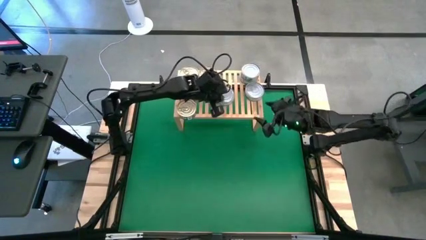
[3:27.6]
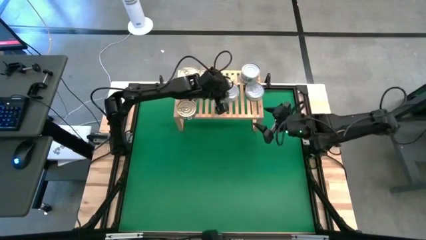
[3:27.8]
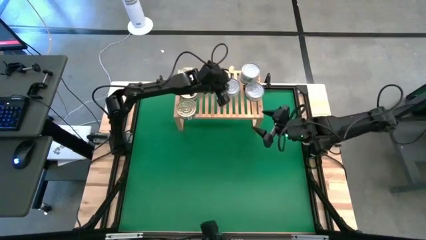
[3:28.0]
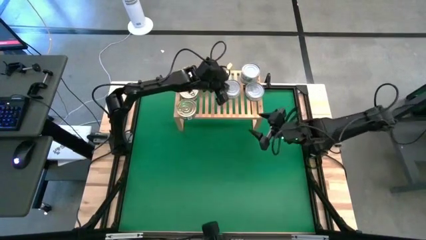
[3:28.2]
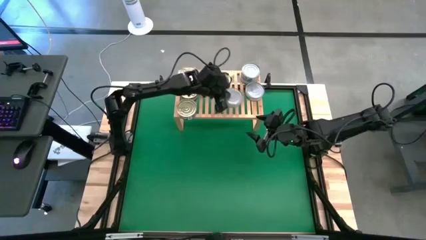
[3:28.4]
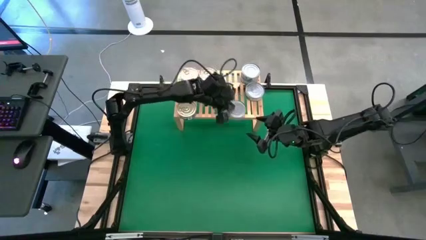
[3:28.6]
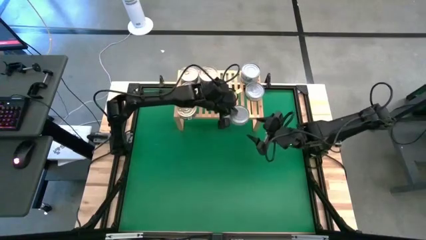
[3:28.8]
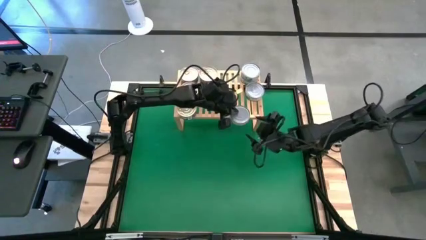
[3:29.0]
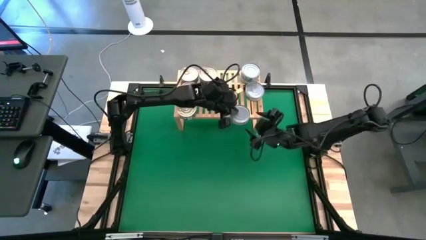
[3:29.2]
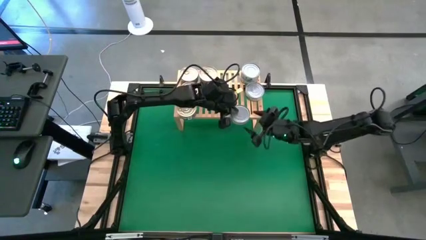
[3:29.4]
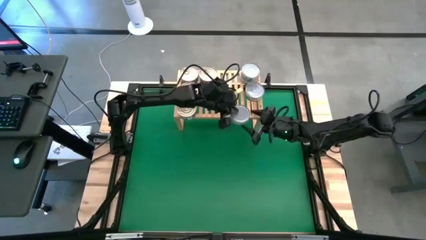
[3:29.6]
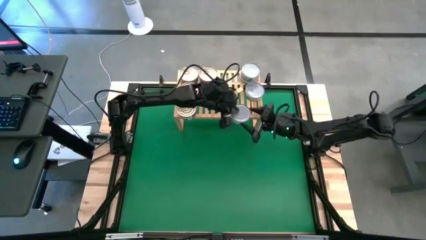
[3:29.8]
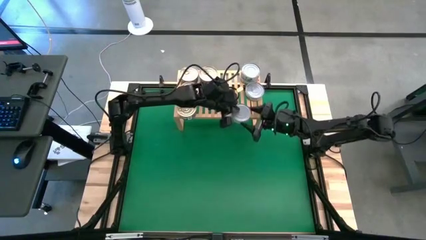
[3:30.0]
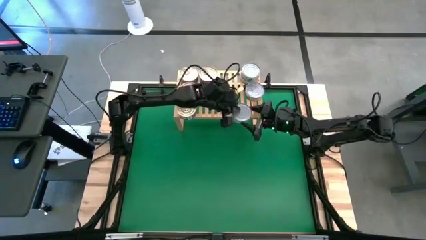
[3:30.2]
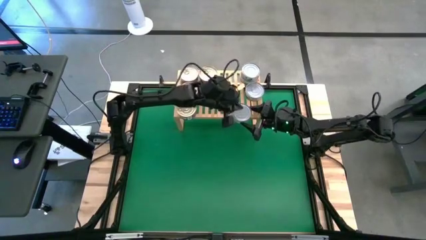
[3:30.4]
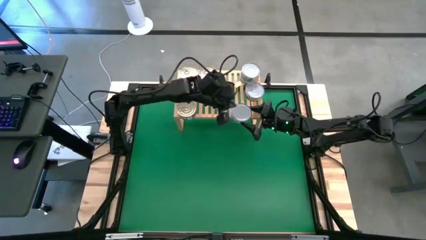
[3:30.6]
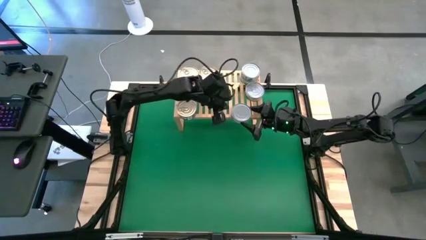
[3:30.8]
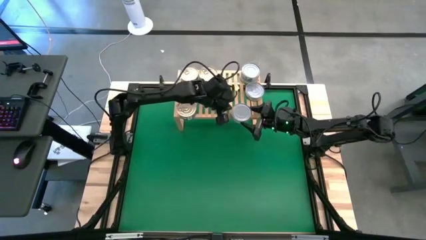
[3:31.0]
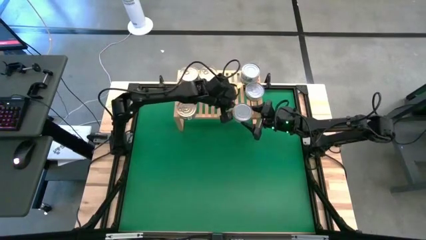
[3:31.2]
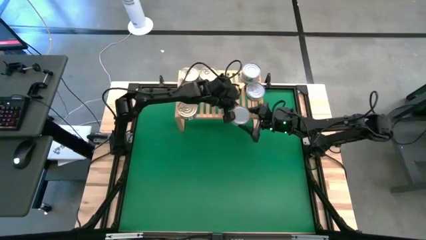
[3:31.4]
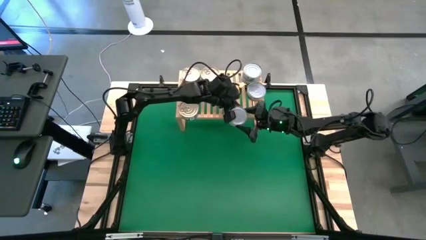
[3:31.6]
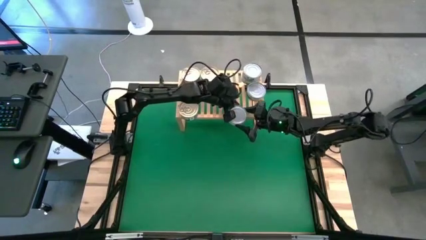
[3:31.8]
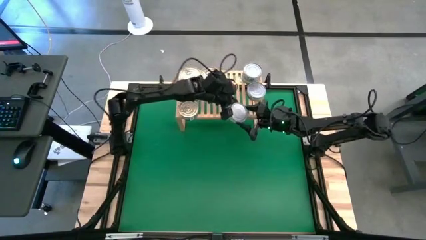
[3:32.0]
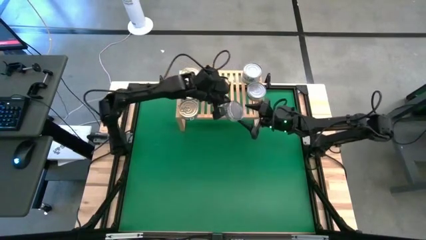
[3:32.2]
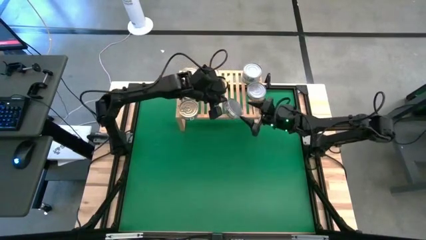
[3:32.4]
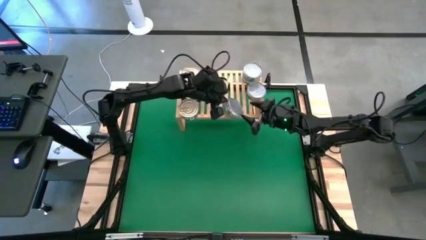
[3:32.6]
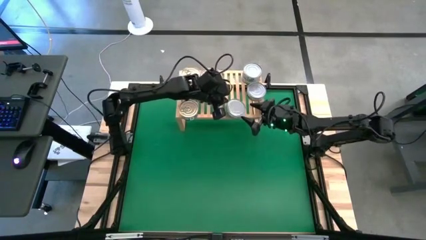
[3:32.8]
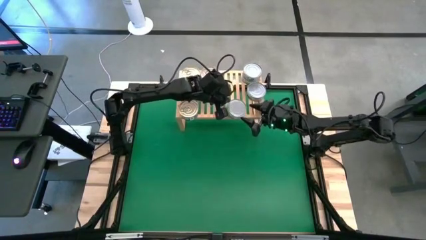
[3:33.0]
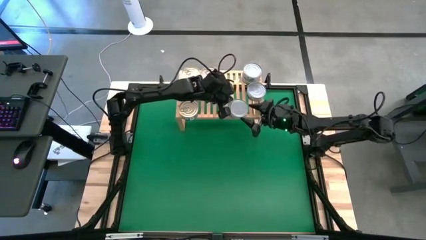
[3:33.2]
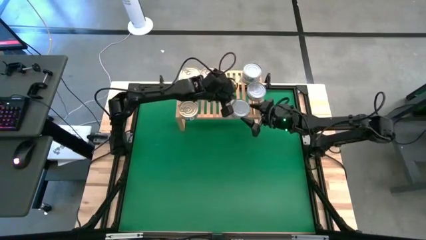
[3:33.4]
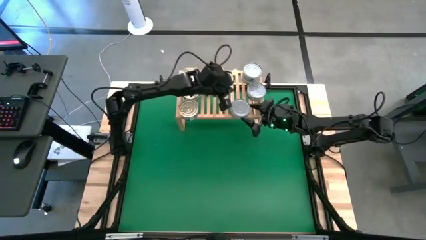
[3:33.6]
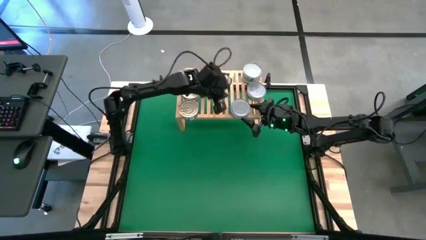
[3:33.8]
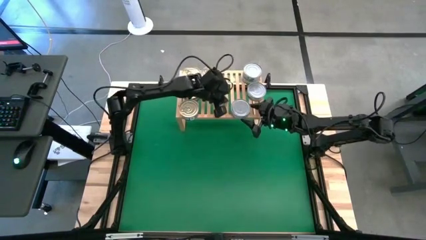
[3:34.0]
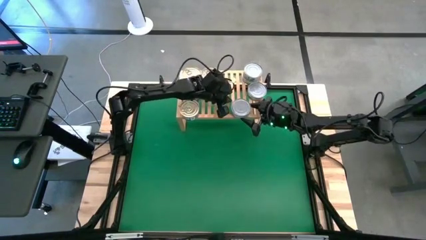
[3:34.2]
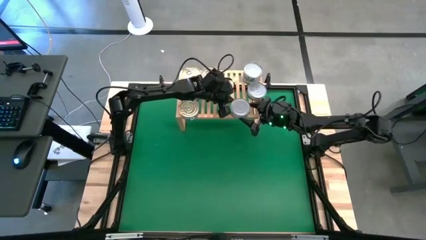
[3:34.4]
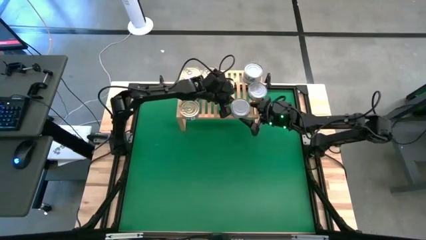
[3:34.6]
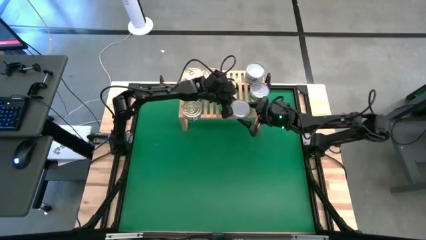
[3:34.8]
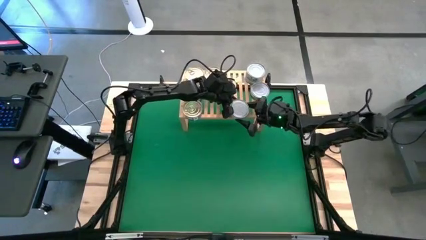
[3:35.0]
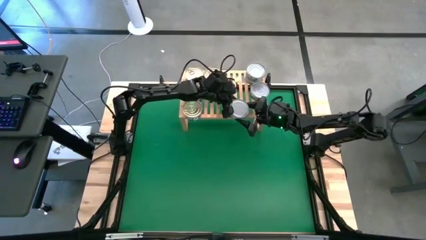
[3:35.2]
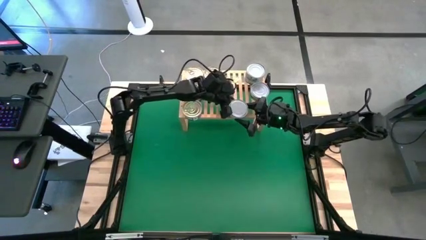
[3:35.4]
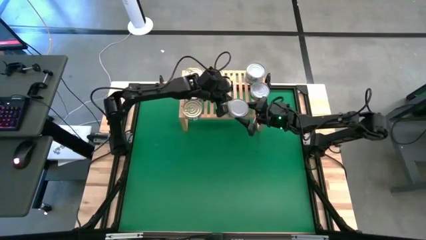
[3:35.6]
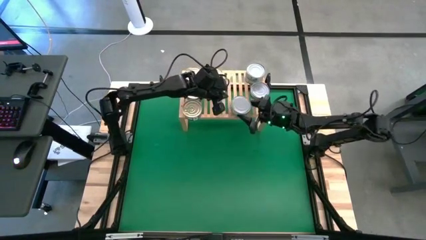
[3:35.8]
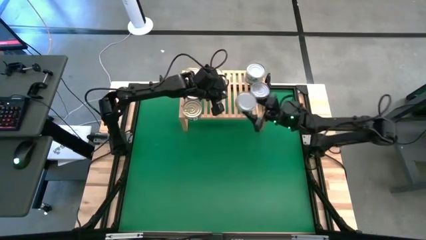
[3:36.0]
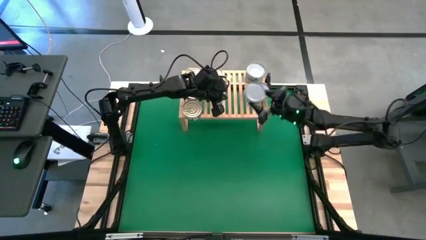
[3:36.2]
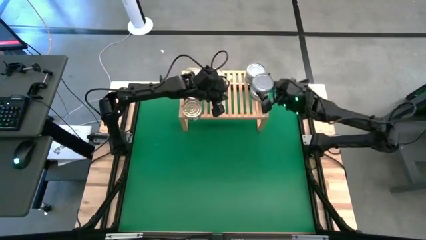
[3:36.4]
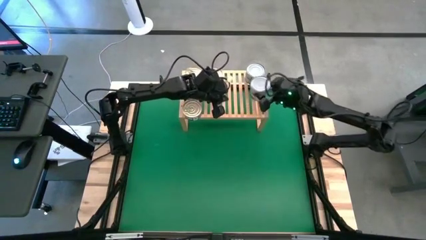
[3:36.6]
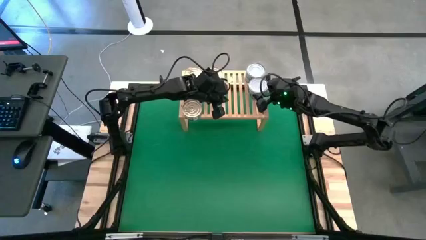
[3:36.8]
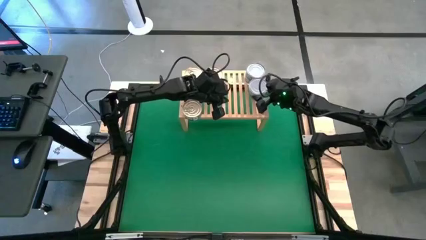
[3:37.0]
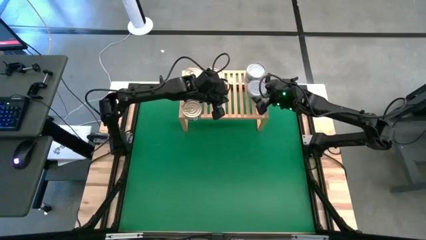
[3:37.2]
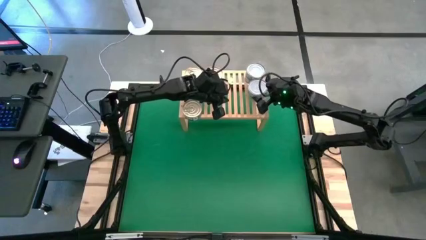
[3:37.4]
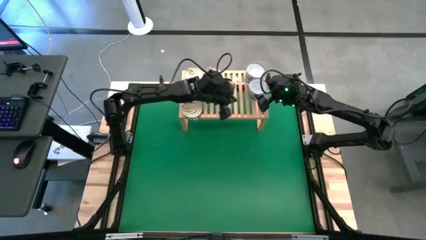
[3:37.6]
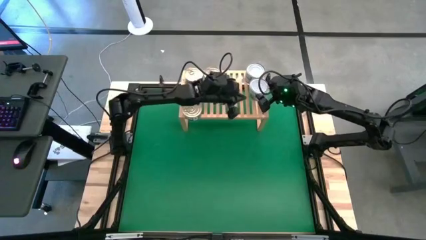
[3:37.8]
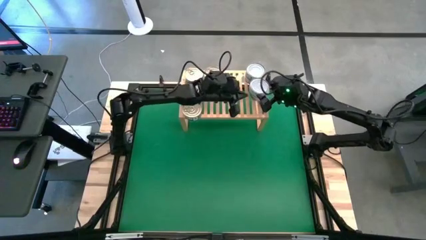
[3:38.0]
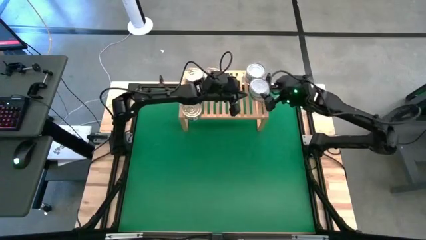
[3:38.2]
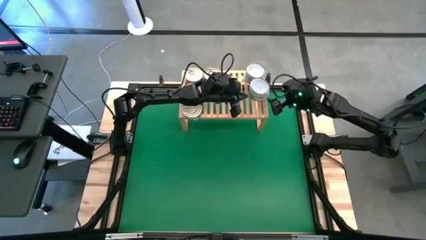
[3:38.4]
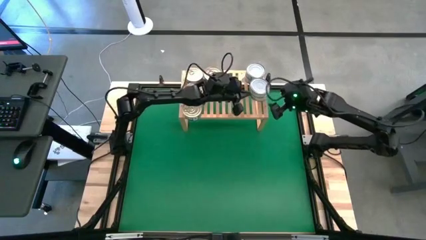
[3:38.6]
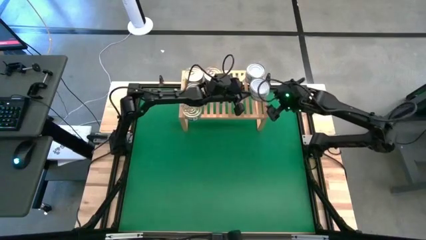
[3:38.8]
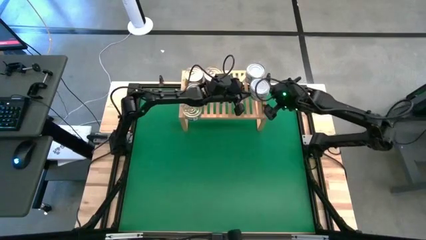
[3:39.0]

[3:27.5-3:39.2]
Task: Stack canned seafood by type on shelf
Stack the green tuna can on top of the green tuna can on the shelf

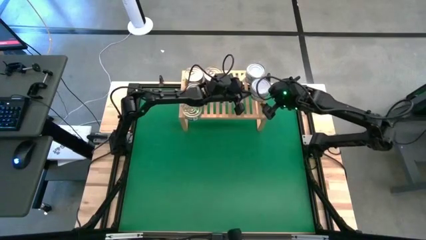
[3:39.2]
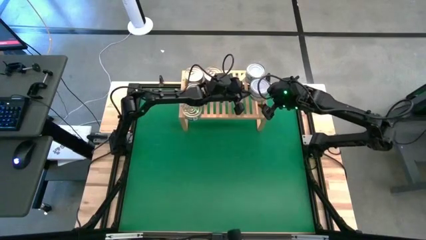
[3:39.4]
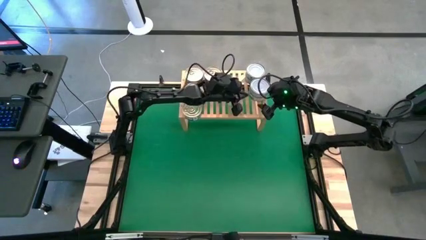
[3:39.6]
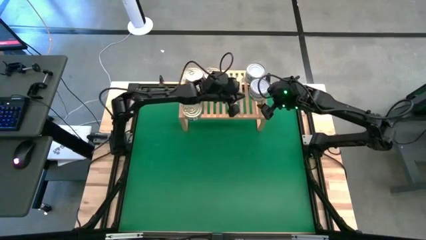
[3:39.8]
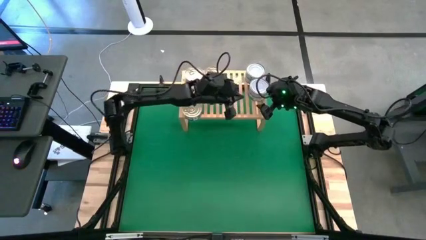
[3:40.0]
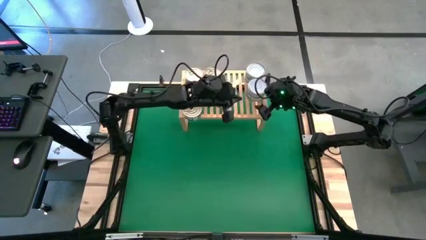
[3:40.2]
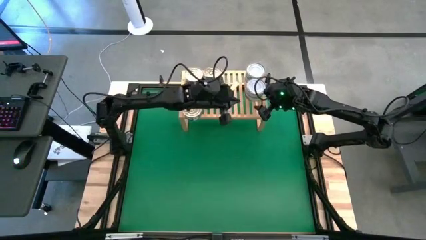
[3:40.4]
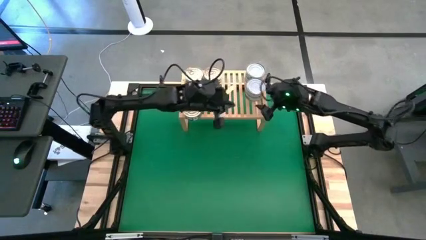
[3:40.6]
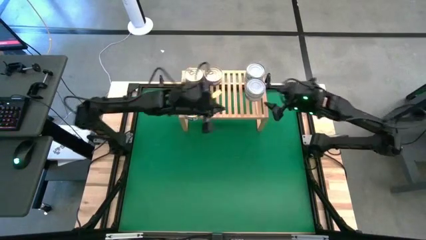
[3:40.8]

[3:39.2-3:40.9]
Adjust the green tuna can

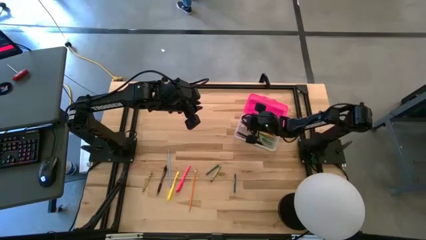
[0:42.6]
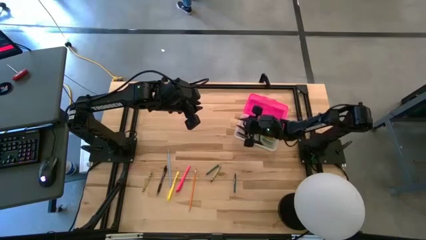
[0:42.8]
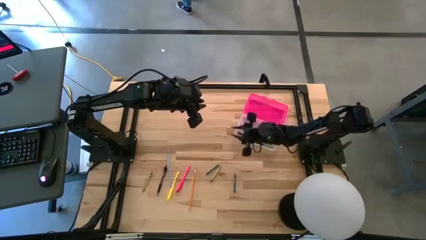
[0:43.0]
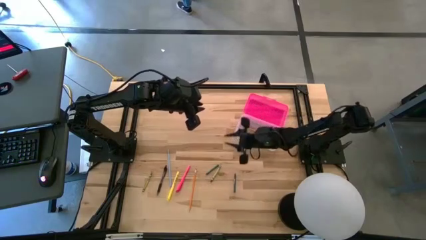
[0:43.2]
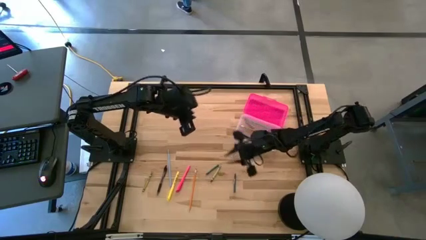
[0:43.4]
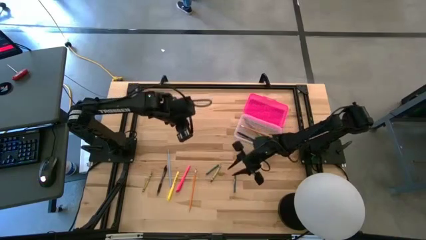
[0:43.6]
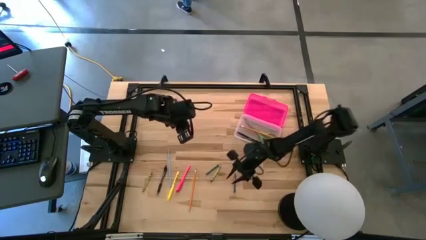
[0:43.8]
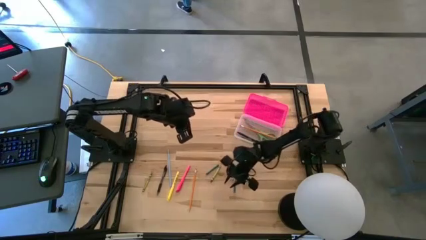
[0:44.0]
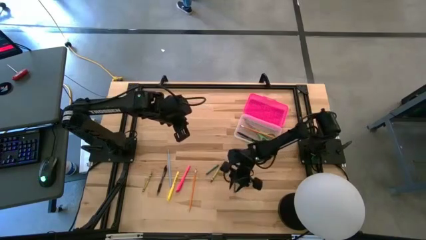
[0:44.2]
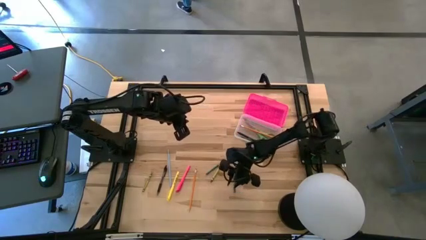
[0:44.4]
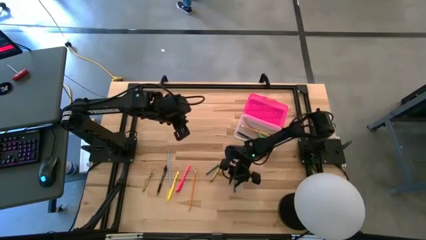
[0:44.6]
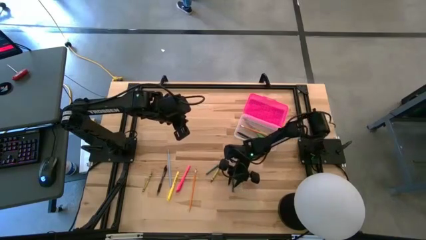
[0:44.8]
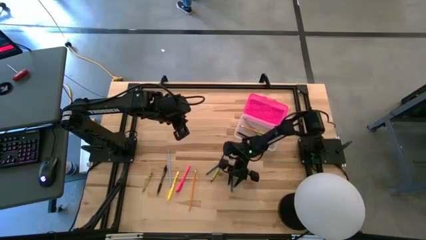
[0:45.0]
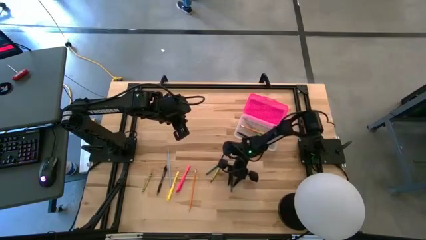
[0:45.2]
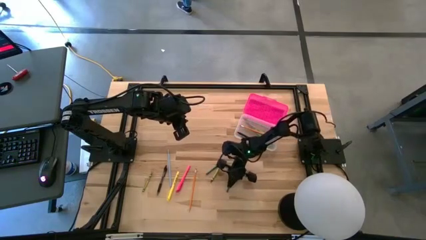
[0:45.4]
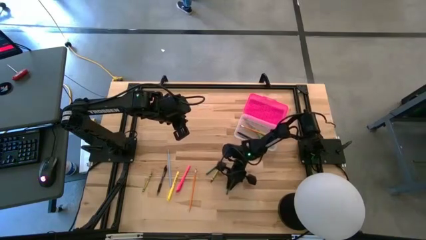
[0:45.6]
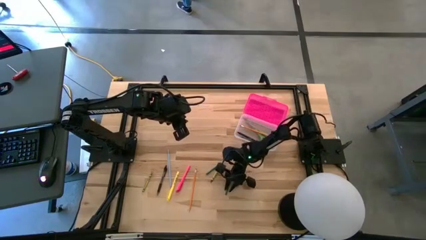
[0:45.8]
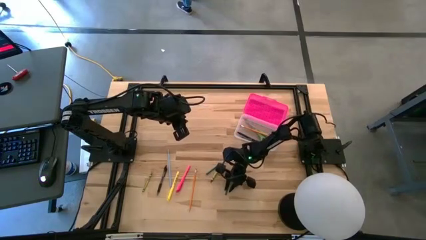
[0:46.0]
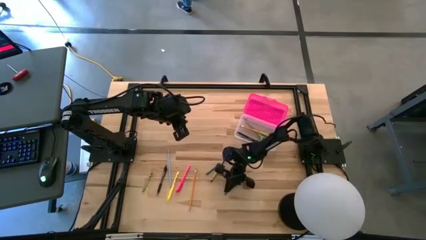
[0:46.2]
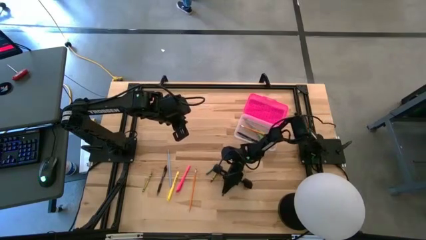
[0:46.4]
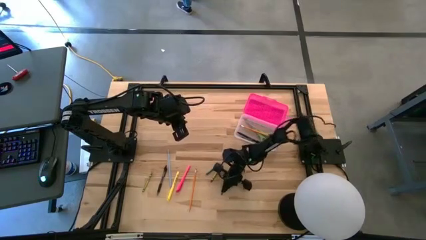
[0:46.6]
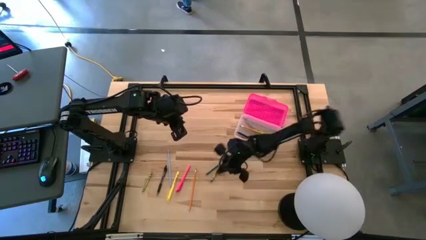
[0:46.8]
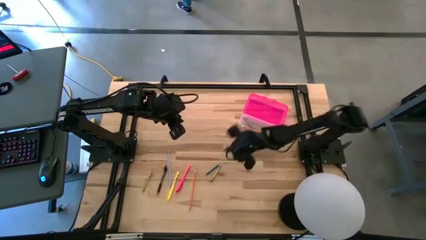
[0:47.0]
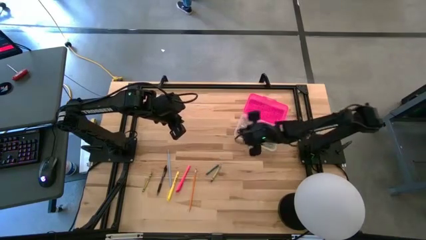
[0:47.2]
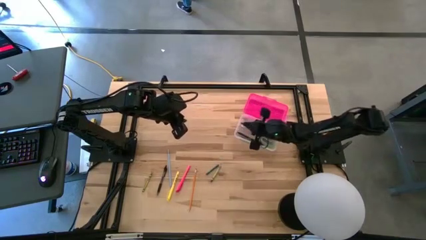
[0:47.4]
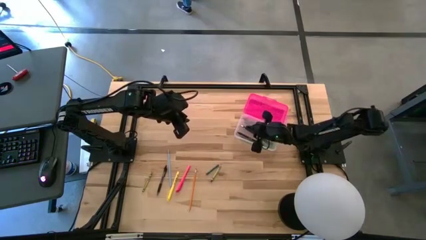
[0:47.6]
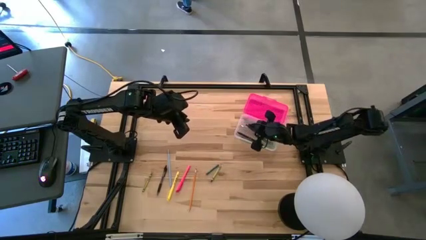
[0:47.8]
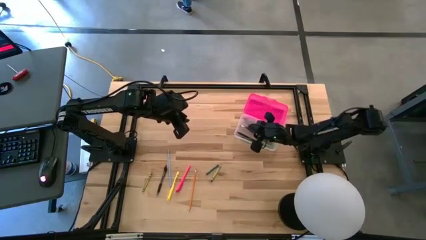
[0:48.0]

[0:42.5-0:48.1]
Task: Pick & place school supplies into a supply box
Put the bottom dark green crayon into the pink supply box
